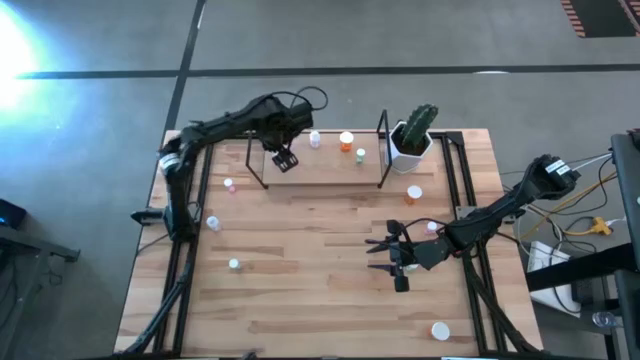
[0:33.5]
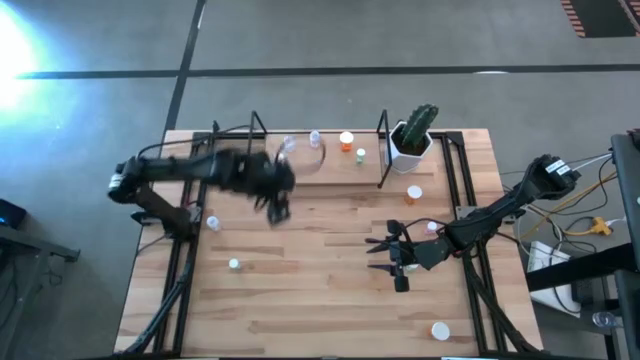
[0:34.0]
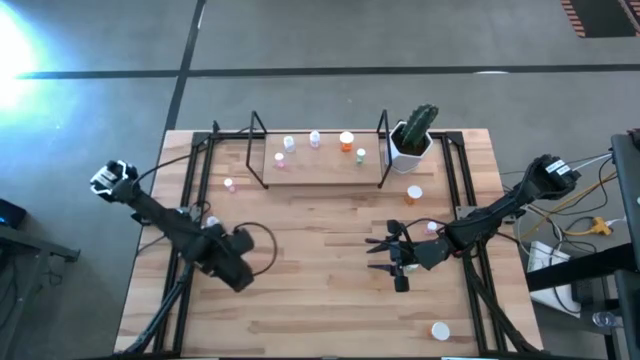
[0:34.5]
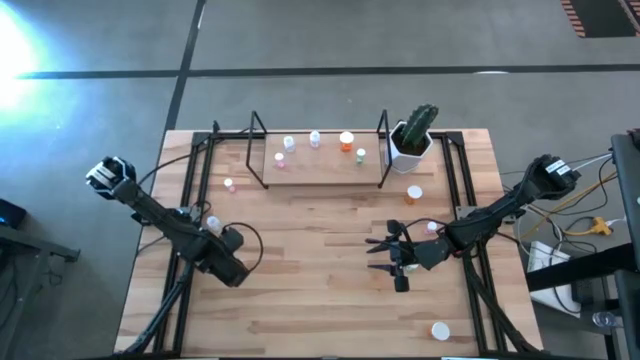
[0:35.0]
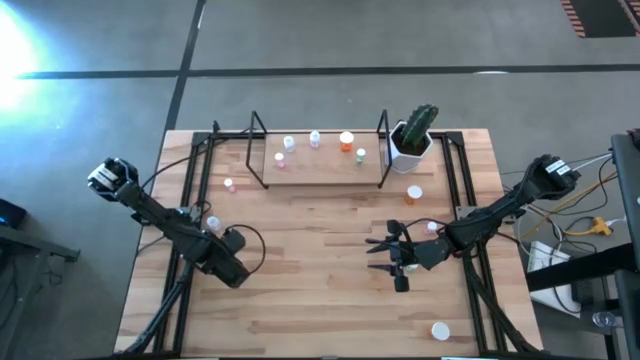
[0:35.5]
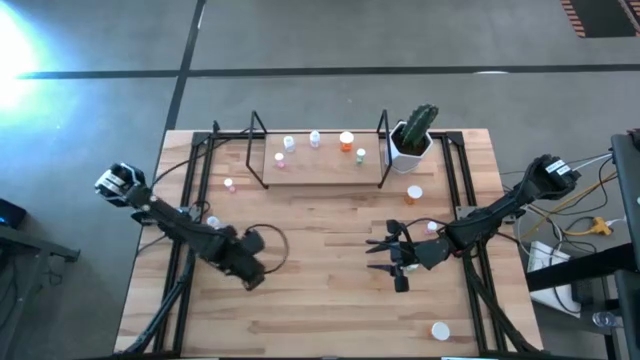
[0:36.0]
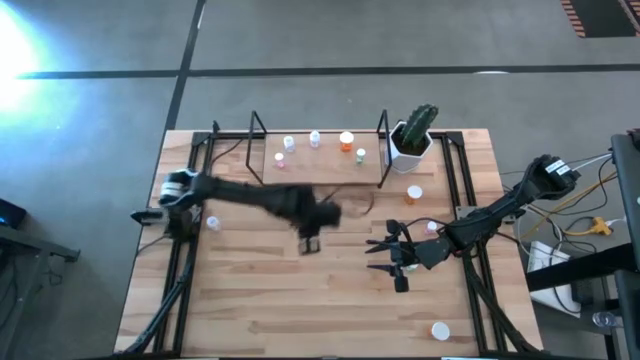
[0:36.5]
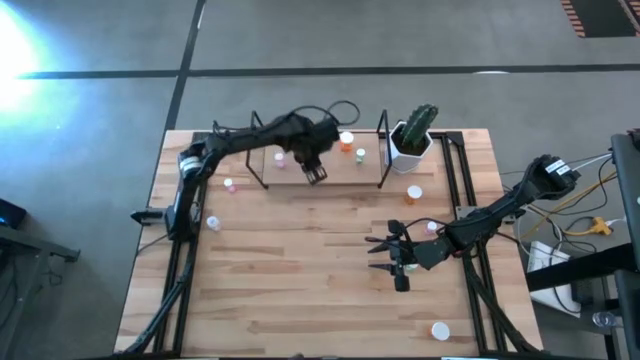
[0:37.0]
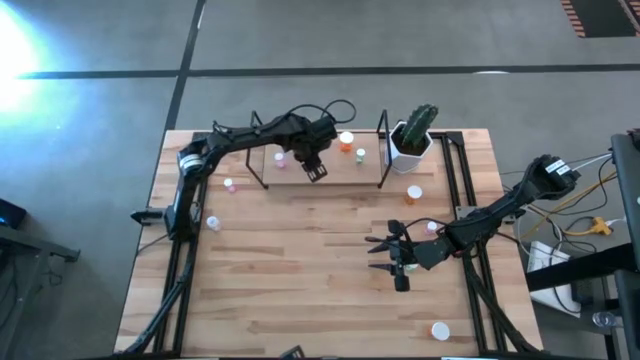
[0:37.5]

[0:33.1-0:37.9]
Task: Pick and place medicine bottles onto shelf by color
Put the left green medicine bottle on the shelf

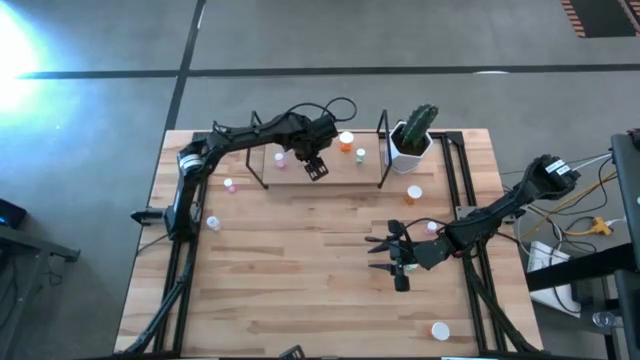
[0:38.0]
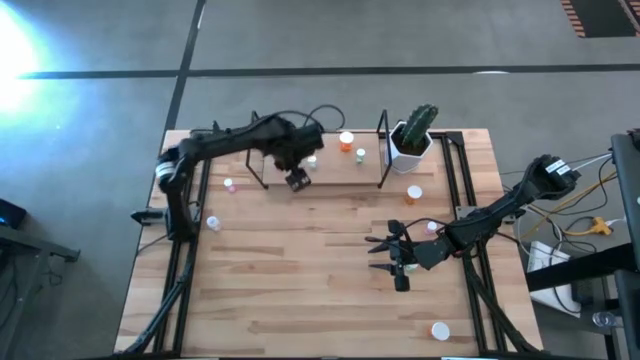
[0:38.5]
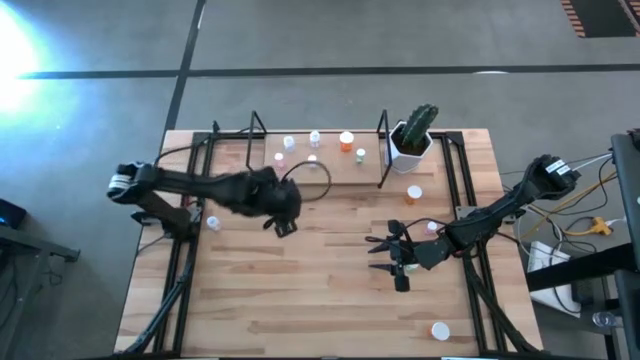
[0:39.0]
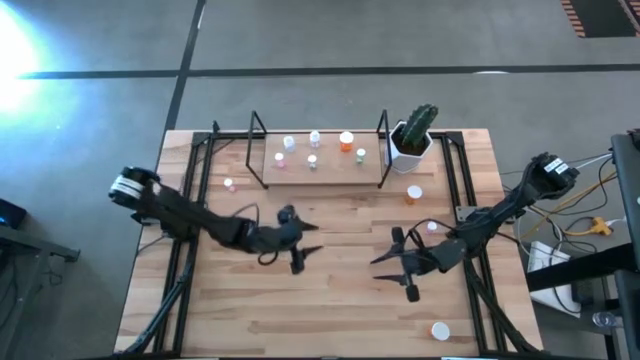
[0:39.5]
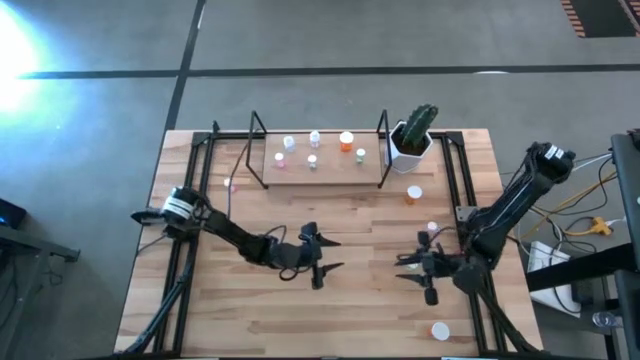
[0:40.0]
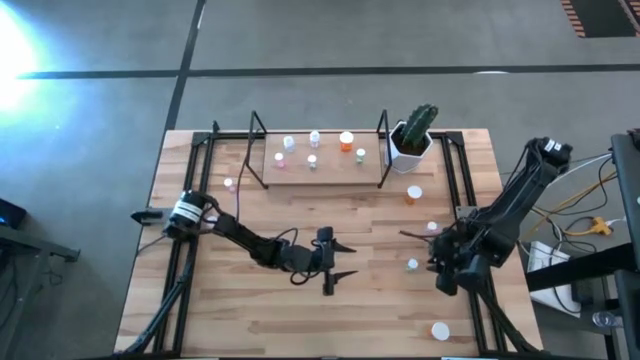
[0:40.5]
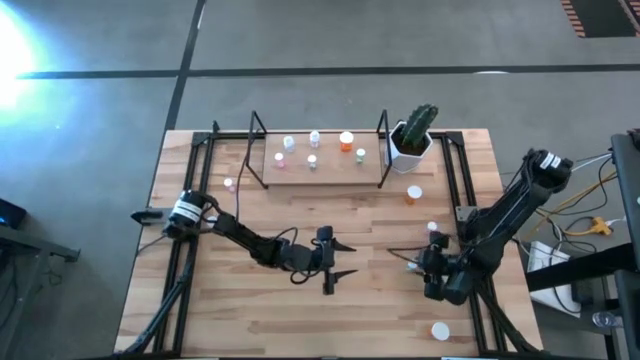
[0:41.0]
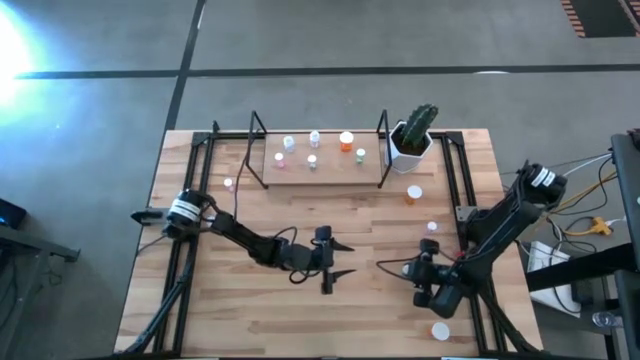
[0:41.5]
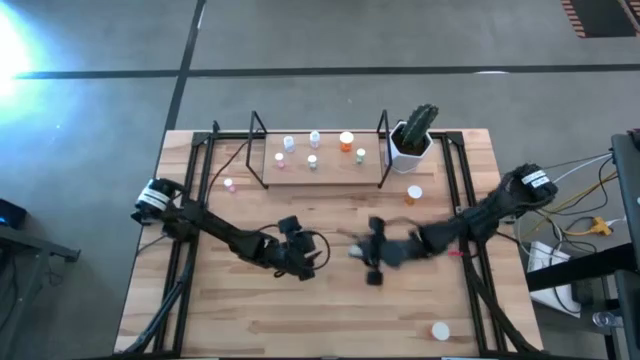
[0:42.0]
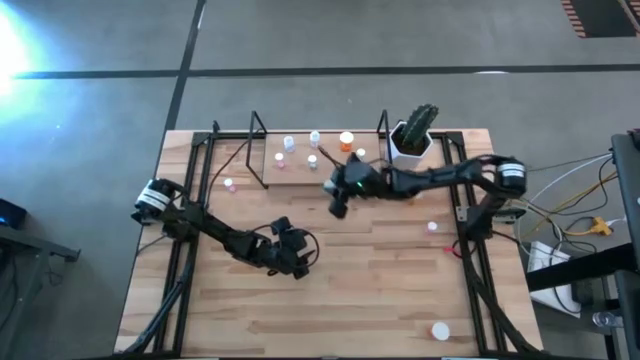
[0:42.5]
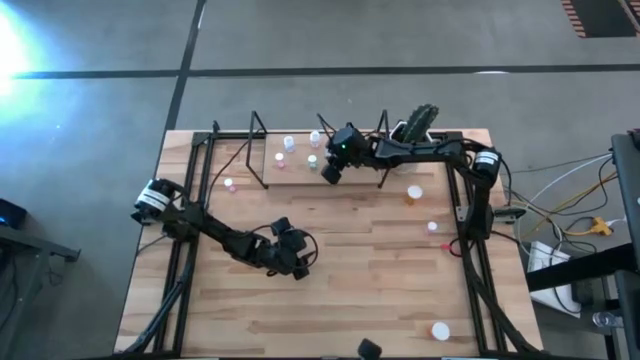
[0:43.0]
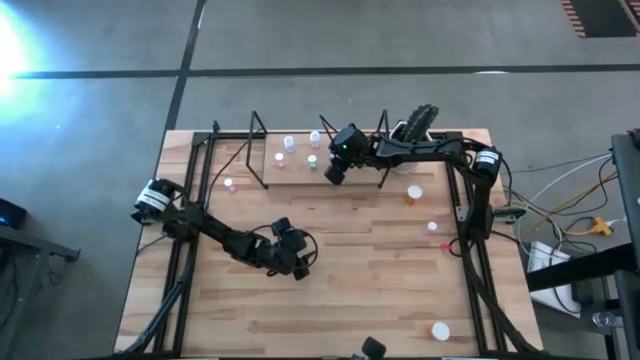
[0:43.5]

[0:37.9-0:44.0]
Put the green medicine bottle on the shelf

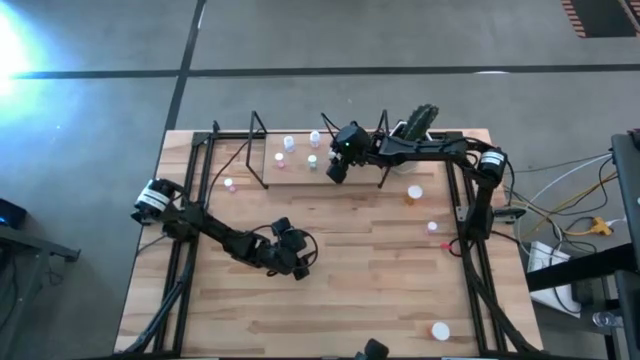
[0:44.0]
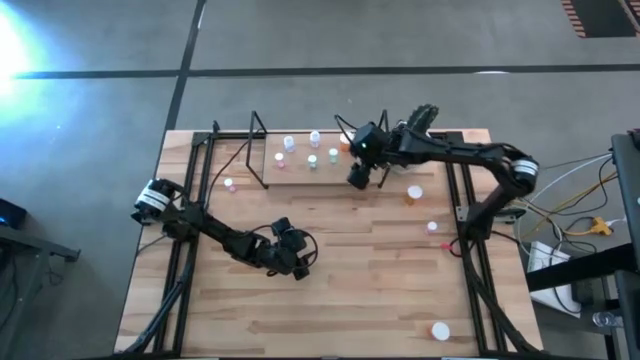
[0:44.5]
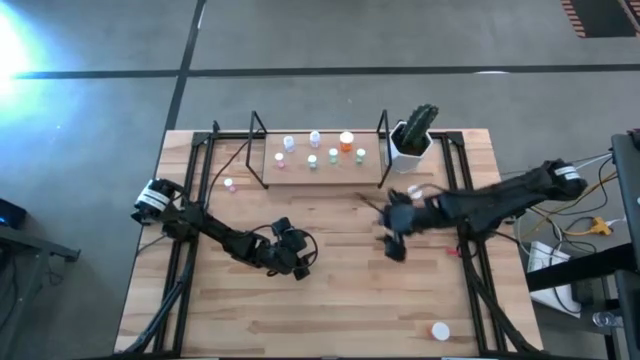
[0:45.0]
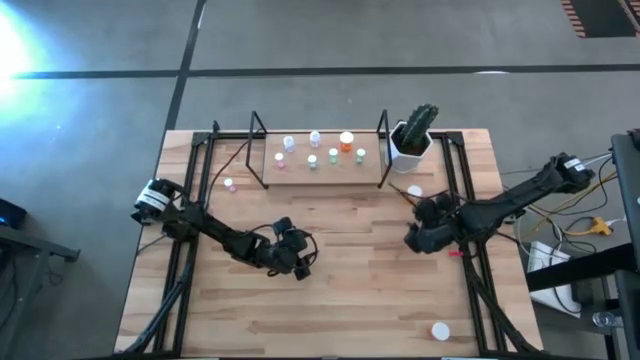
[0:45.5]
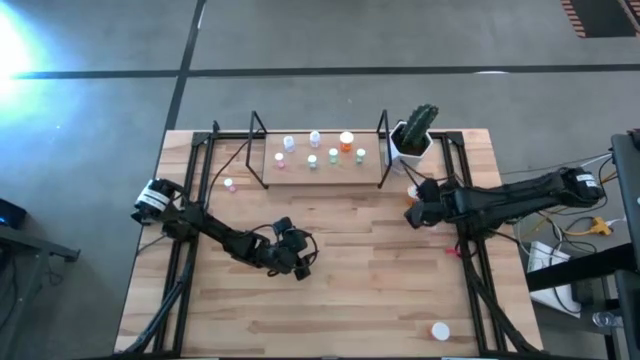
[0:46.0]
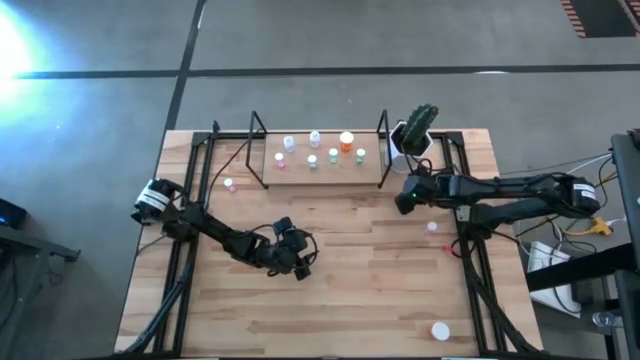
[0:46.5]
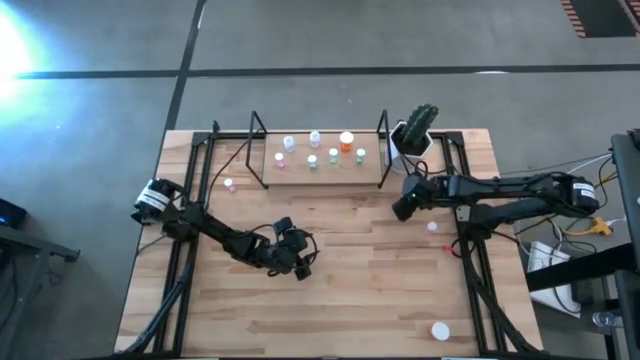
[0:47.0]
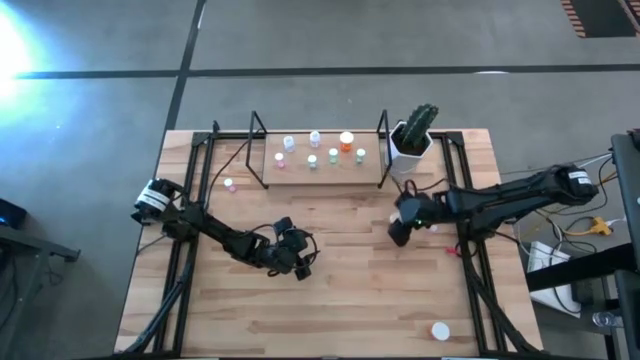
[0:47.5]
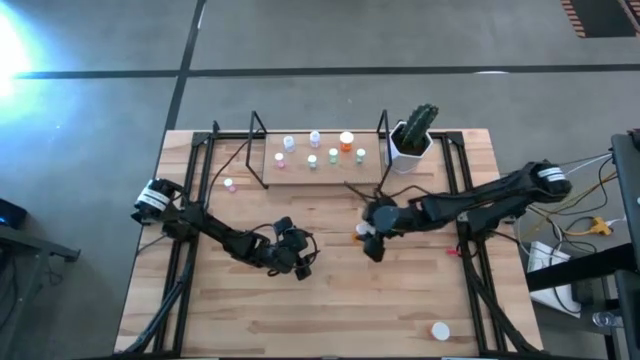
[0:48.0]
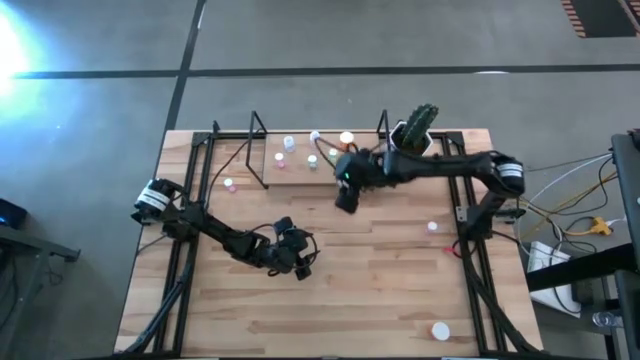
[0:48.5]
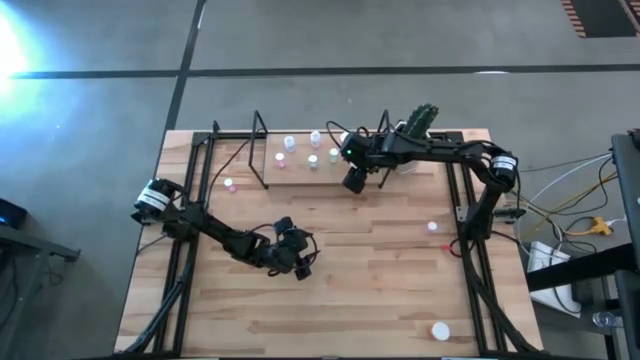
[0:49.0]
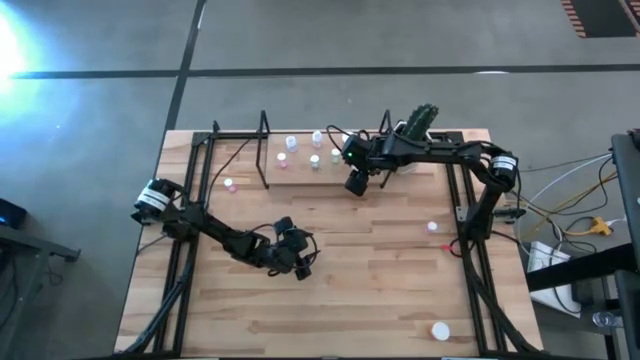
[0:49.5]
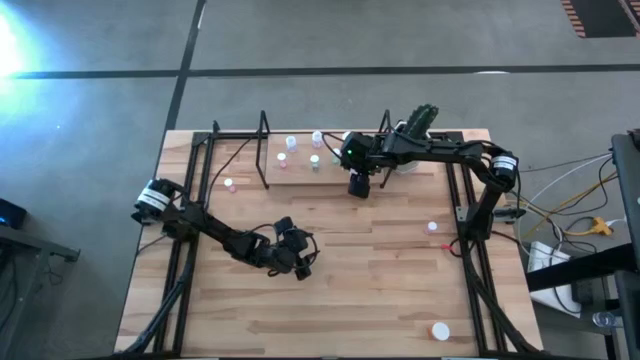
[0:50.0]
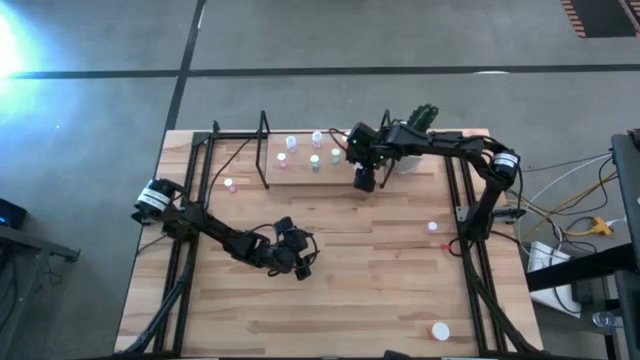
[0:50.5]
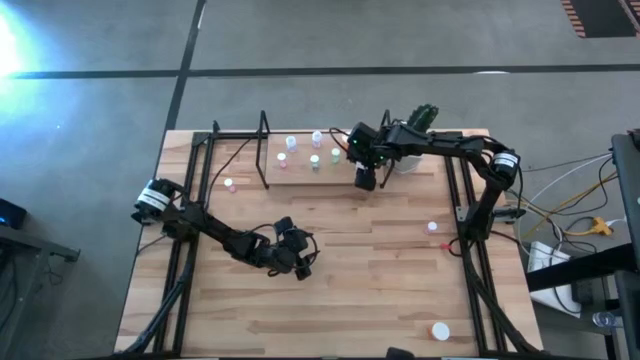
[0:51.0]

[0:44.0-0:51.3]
Put the top orange medicine bottle on the shelf

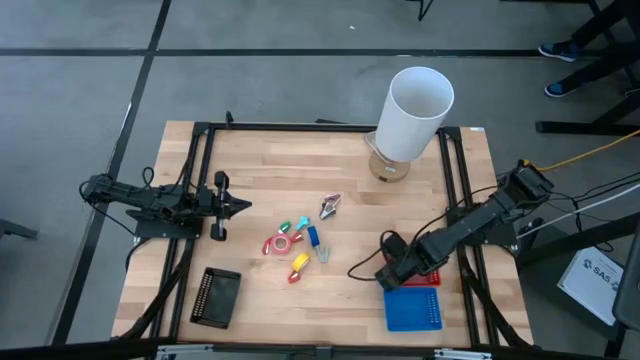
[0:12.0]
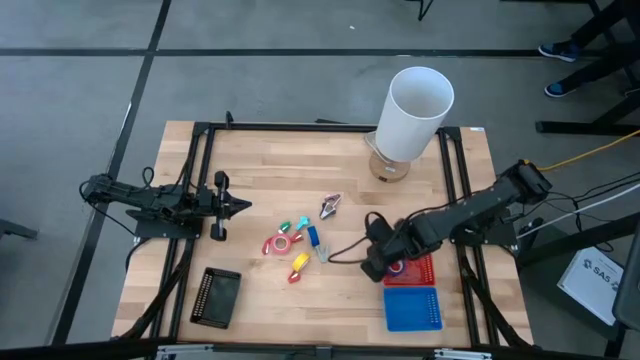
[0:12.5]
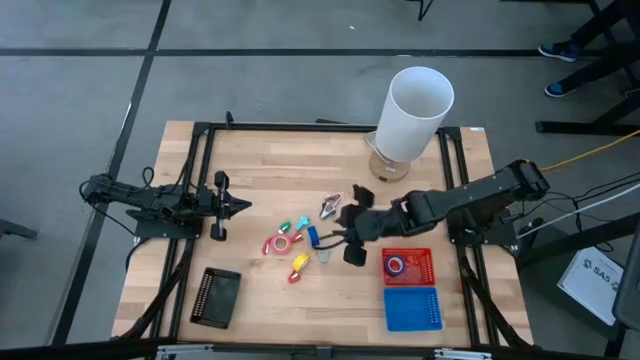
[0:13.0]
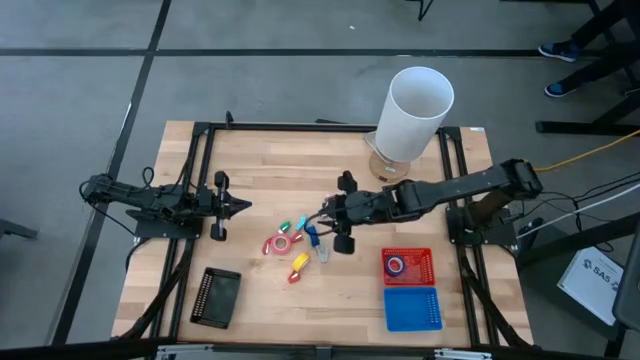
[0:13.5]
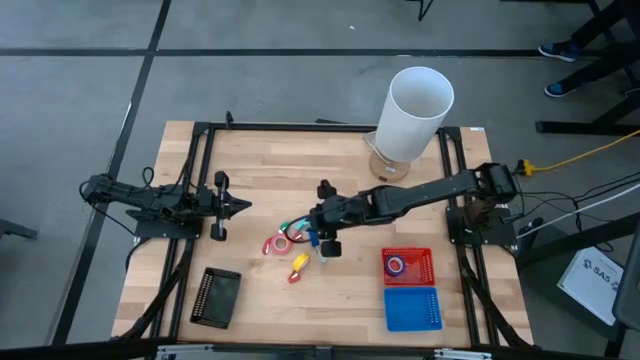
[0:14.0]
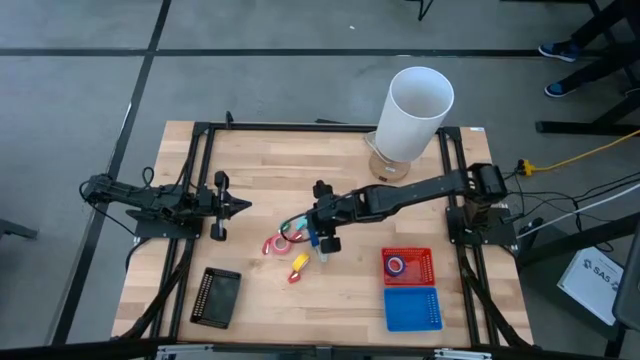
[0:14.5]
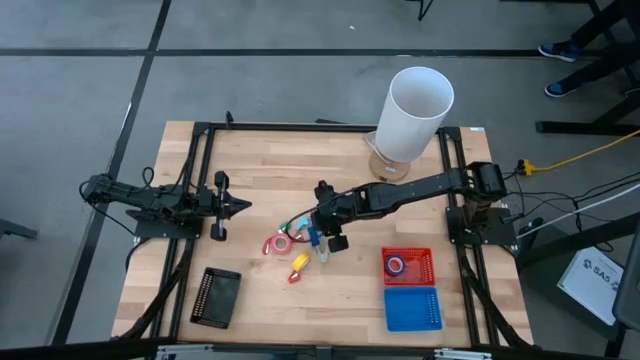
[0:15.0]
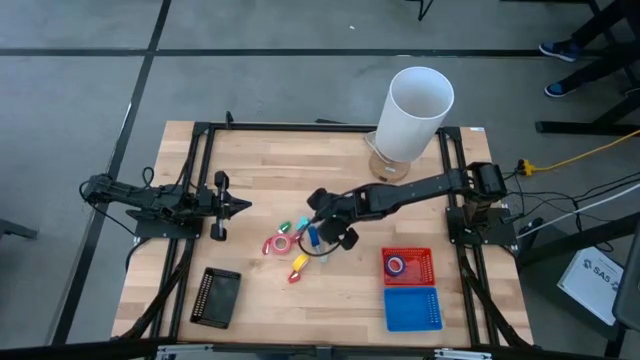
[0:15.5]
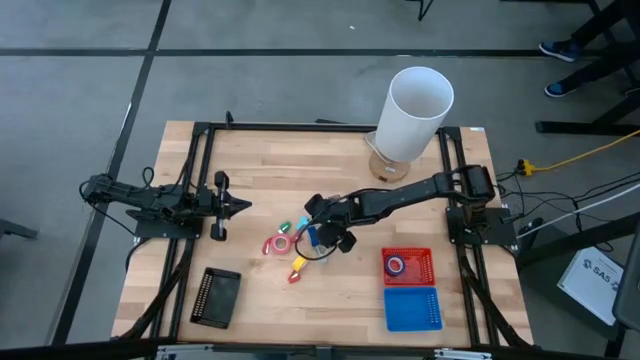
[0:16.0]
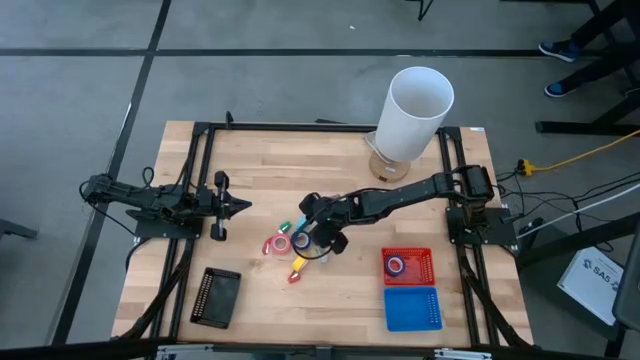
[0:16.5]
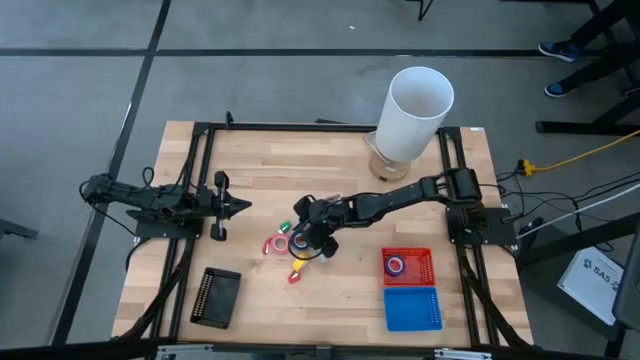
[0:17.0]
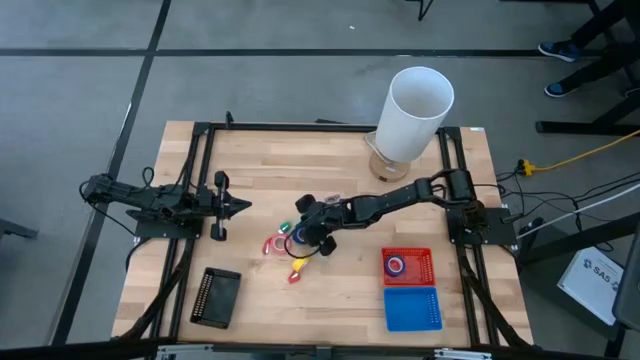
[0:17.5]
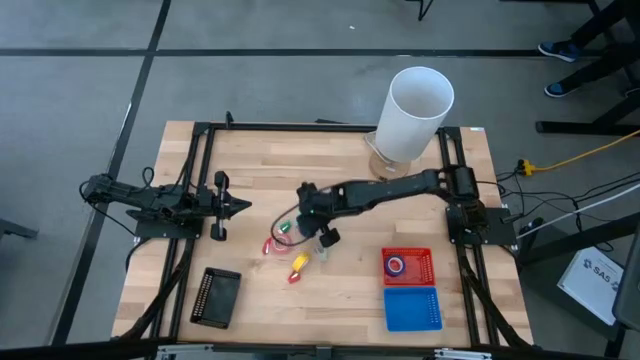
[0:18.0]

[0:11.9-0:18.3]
Task: Pick and place Stapler, Stapler remover, tape
Put the blue tape into the red basket
